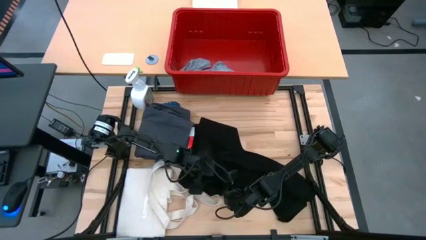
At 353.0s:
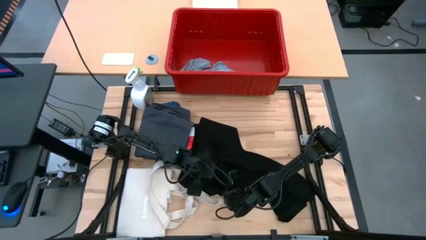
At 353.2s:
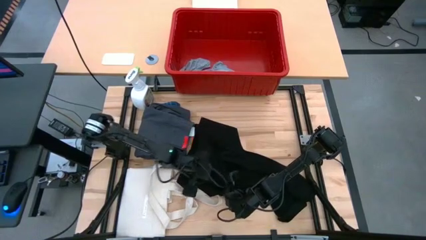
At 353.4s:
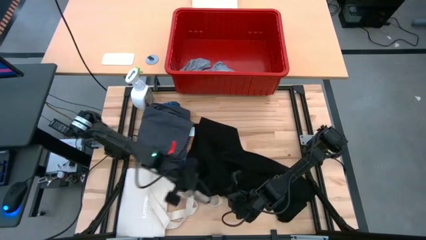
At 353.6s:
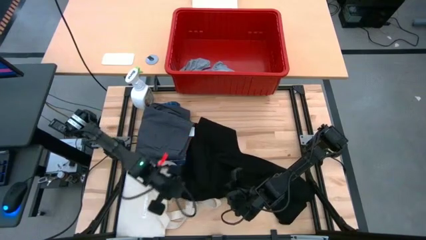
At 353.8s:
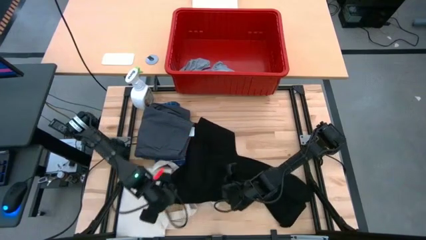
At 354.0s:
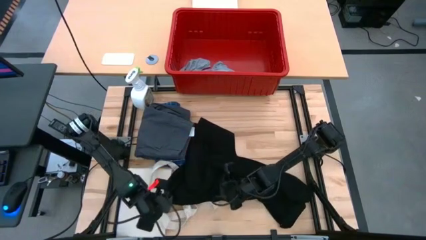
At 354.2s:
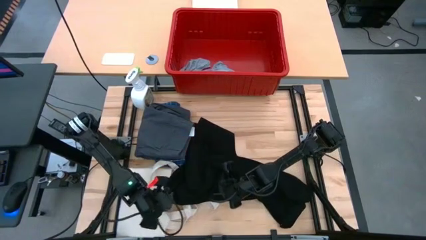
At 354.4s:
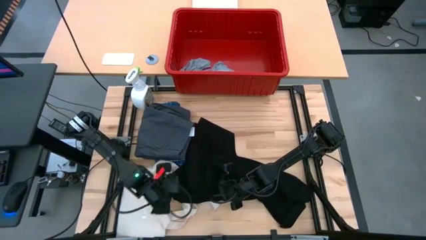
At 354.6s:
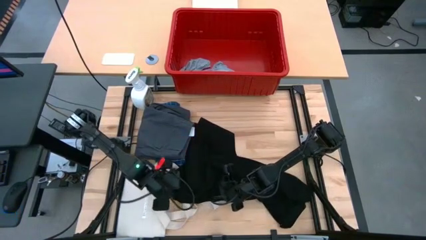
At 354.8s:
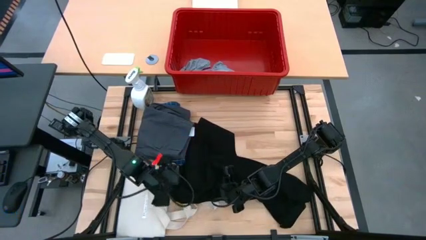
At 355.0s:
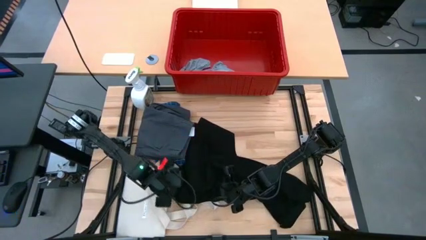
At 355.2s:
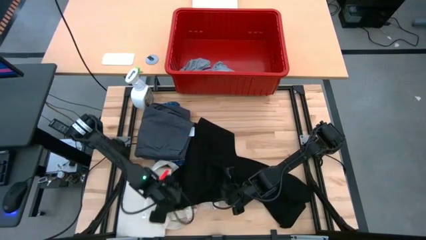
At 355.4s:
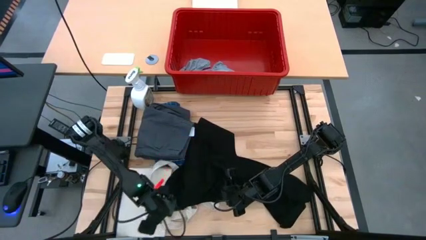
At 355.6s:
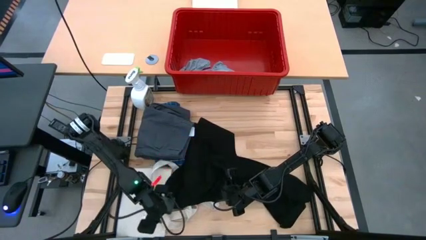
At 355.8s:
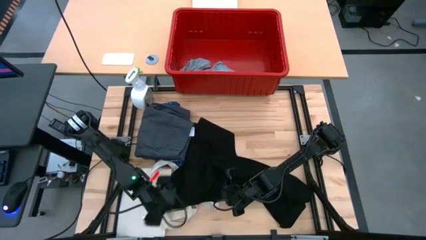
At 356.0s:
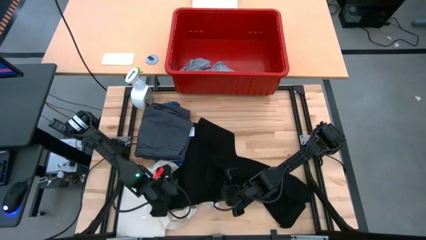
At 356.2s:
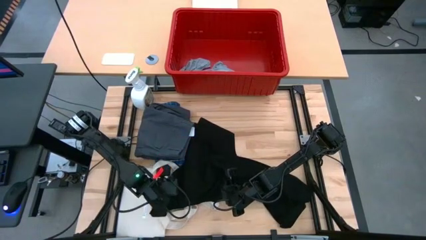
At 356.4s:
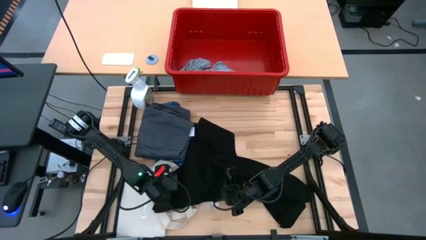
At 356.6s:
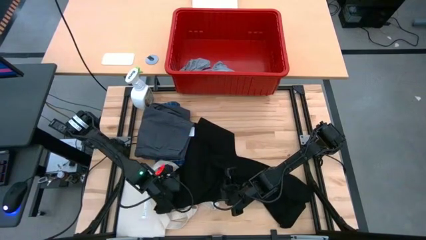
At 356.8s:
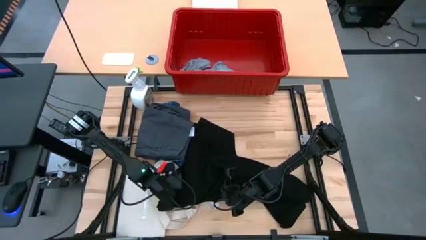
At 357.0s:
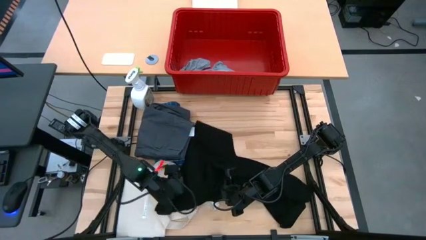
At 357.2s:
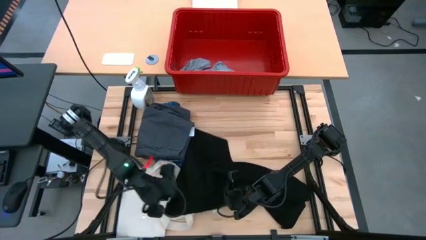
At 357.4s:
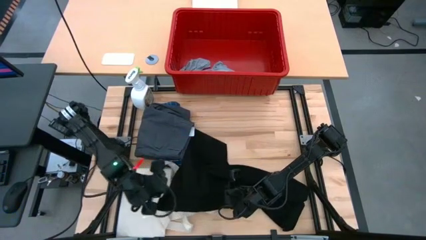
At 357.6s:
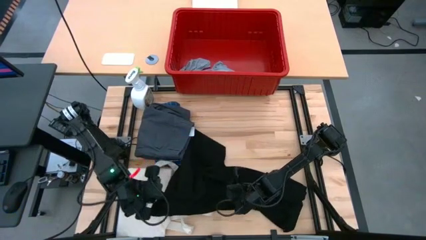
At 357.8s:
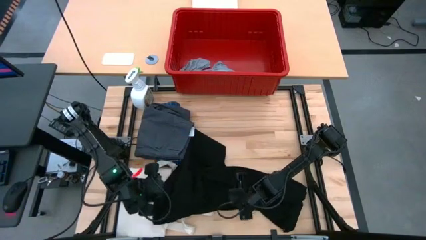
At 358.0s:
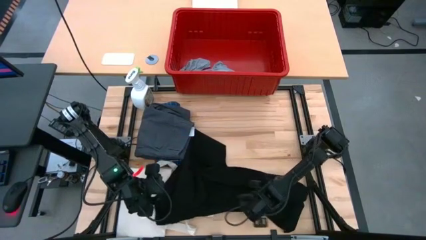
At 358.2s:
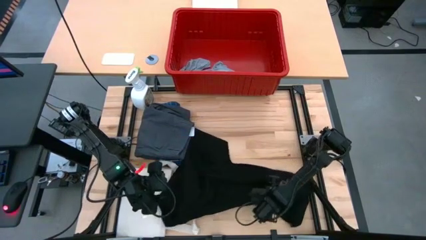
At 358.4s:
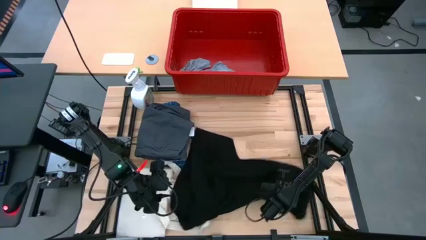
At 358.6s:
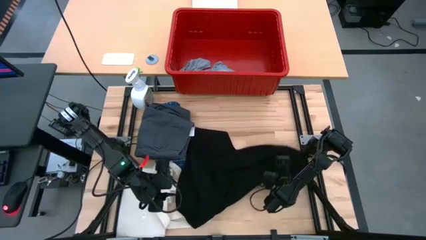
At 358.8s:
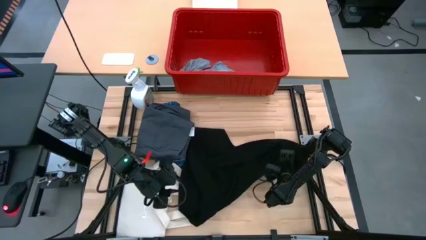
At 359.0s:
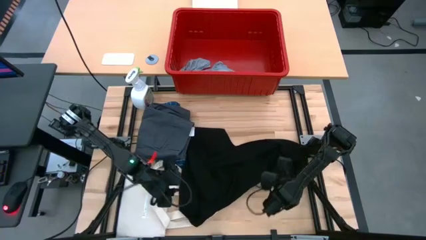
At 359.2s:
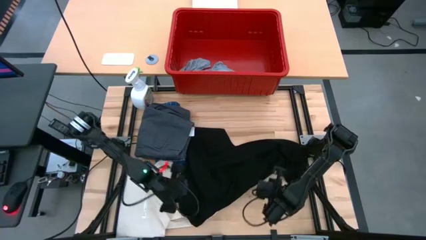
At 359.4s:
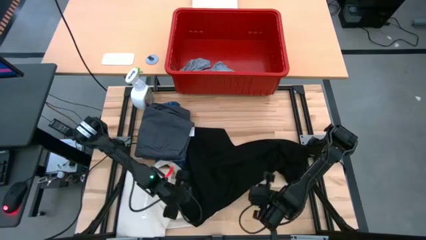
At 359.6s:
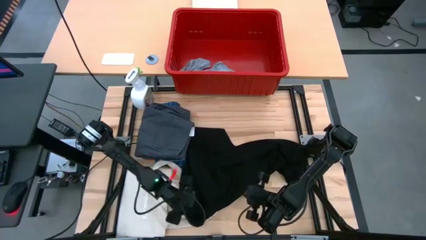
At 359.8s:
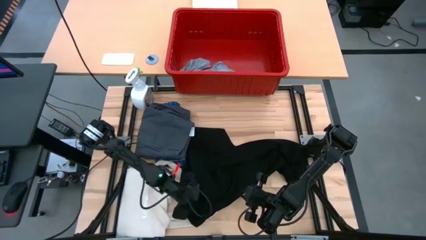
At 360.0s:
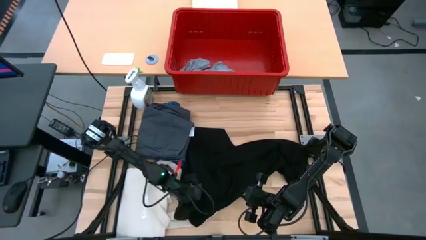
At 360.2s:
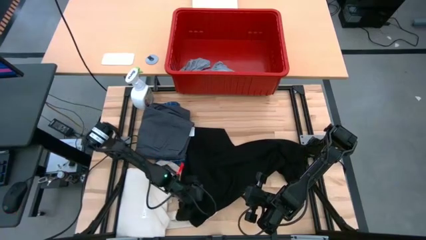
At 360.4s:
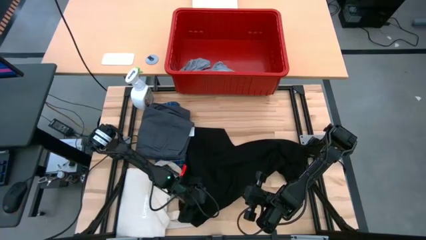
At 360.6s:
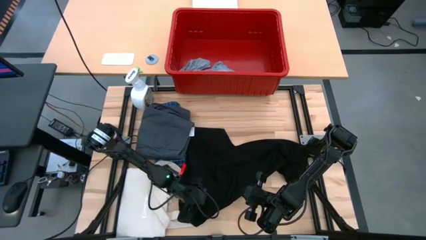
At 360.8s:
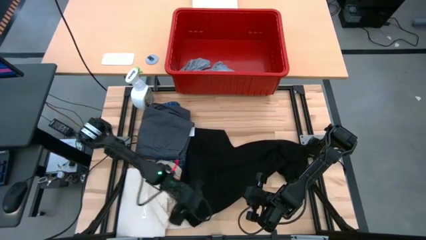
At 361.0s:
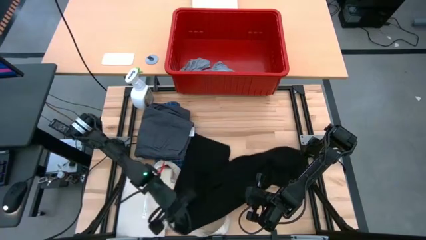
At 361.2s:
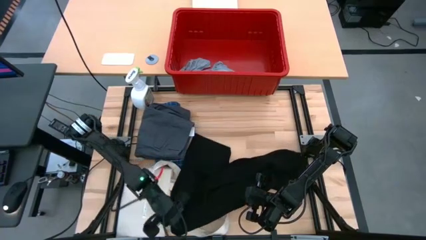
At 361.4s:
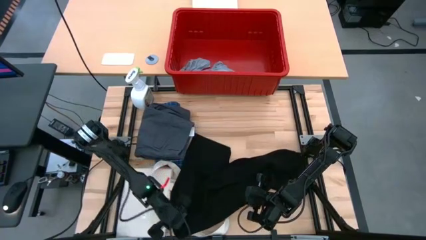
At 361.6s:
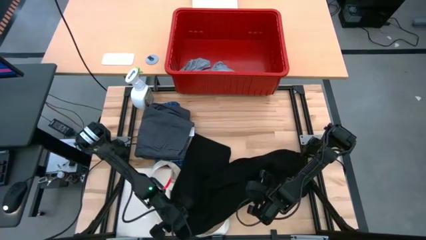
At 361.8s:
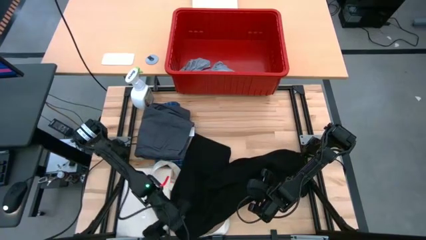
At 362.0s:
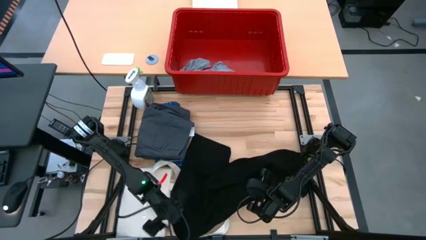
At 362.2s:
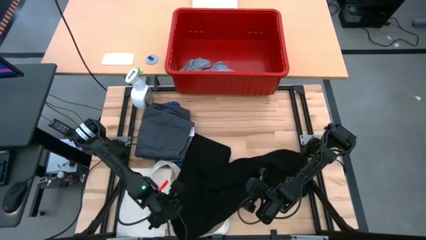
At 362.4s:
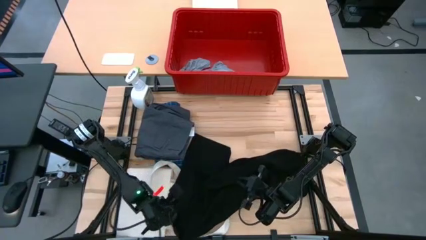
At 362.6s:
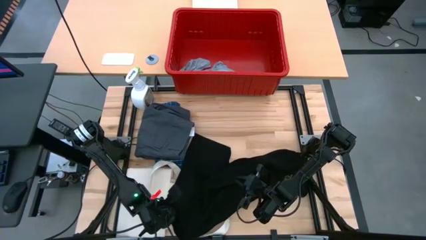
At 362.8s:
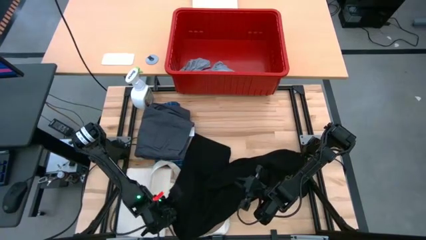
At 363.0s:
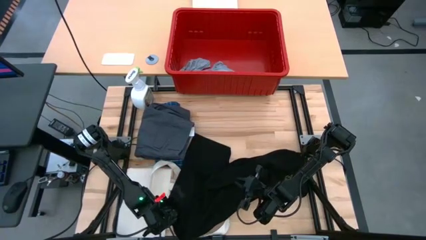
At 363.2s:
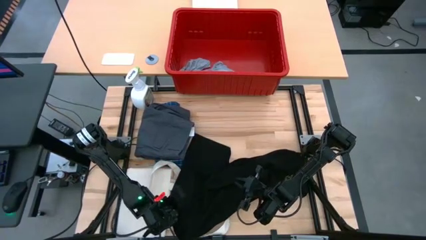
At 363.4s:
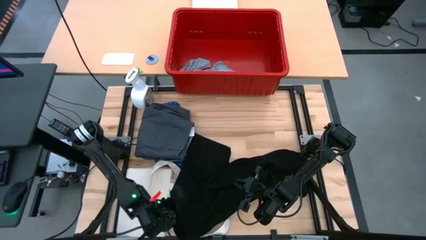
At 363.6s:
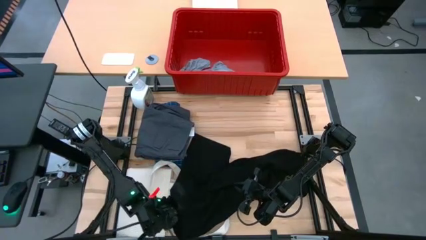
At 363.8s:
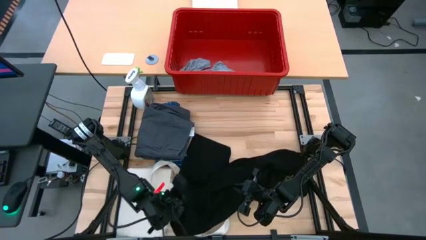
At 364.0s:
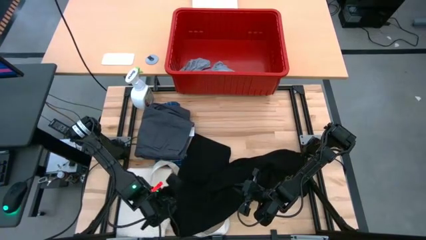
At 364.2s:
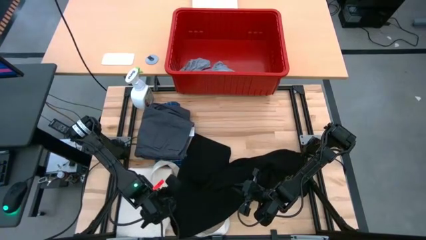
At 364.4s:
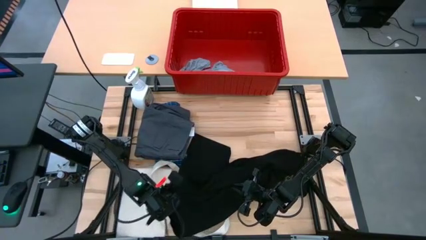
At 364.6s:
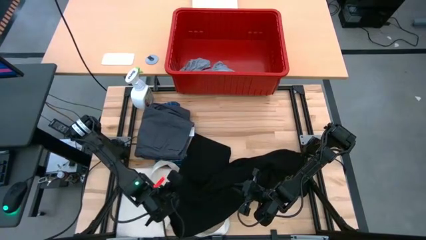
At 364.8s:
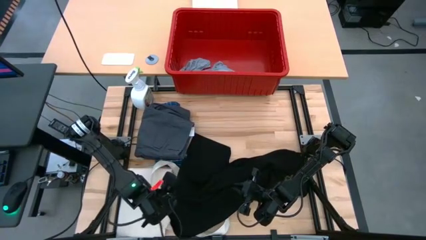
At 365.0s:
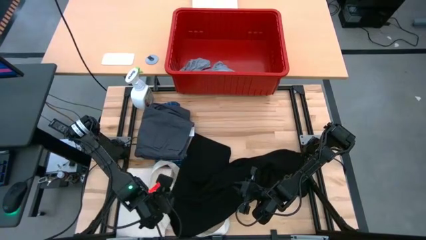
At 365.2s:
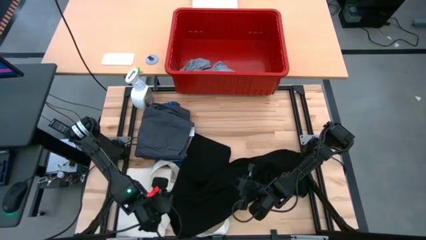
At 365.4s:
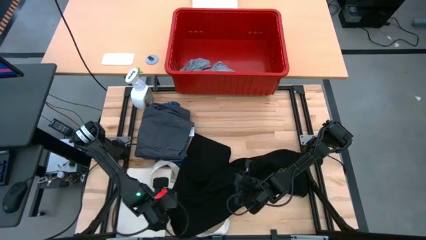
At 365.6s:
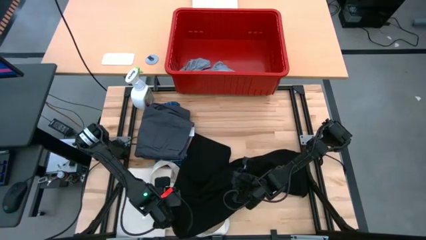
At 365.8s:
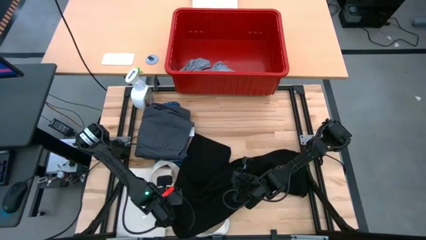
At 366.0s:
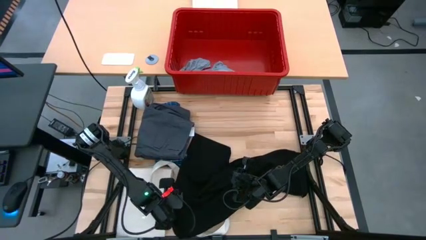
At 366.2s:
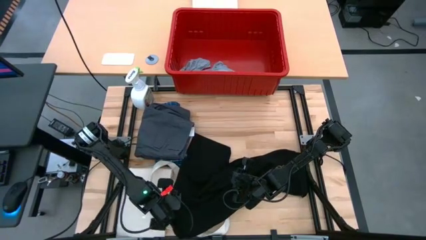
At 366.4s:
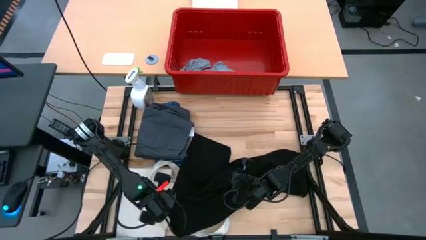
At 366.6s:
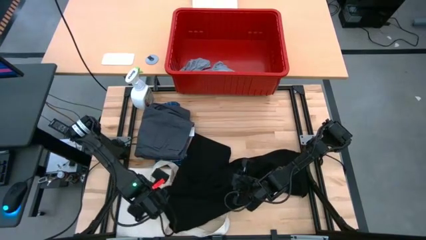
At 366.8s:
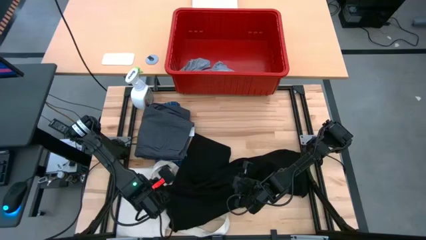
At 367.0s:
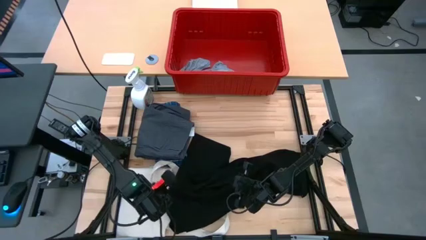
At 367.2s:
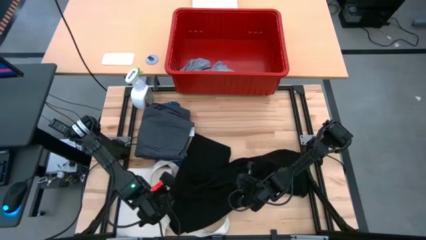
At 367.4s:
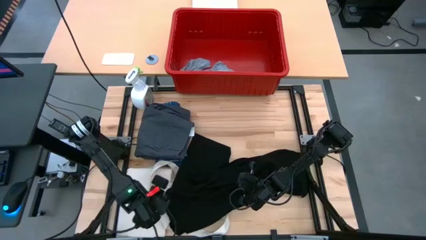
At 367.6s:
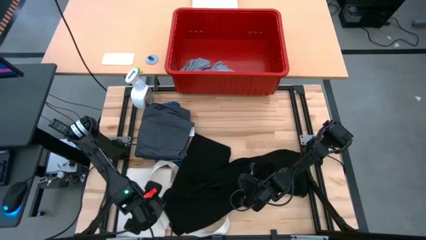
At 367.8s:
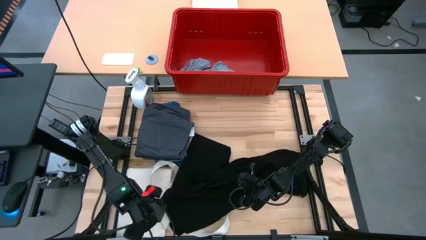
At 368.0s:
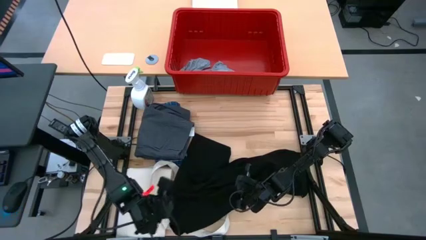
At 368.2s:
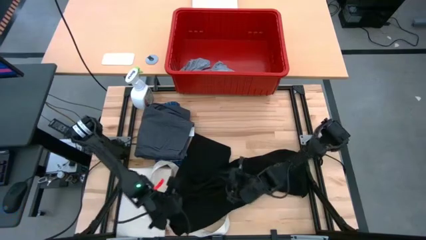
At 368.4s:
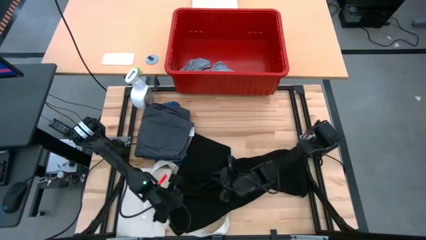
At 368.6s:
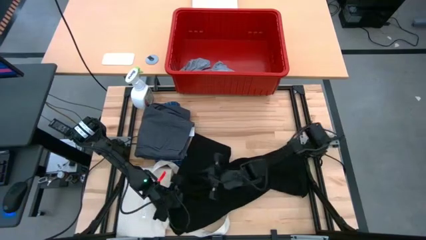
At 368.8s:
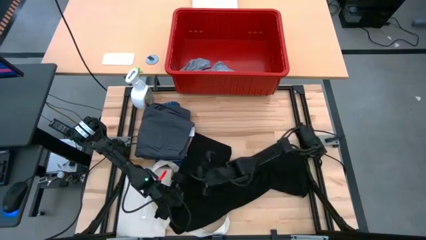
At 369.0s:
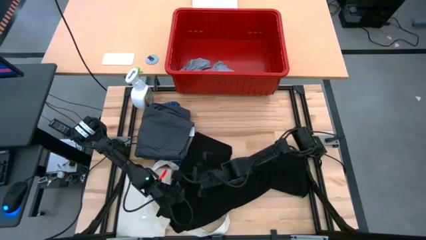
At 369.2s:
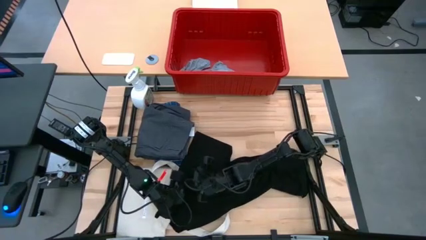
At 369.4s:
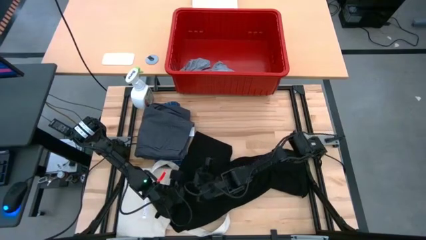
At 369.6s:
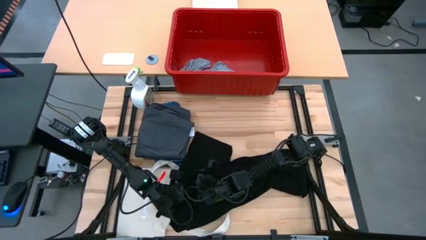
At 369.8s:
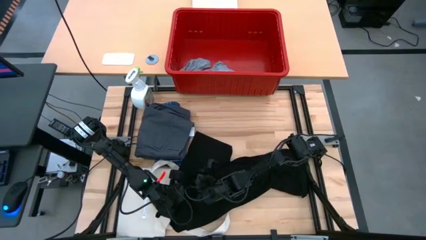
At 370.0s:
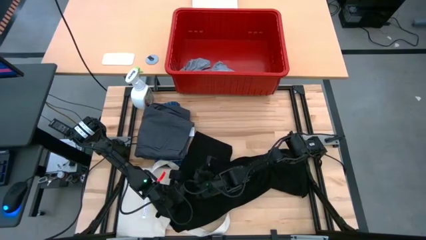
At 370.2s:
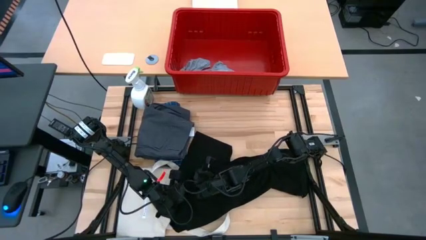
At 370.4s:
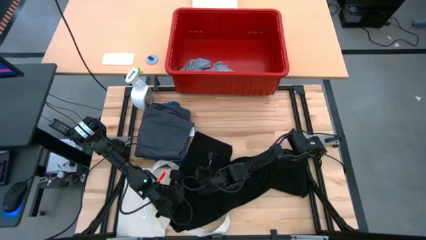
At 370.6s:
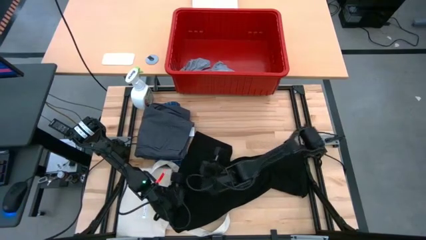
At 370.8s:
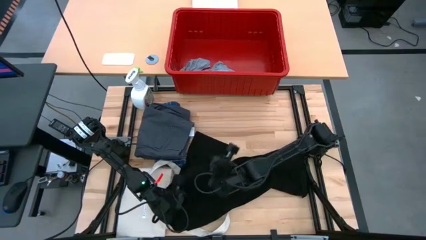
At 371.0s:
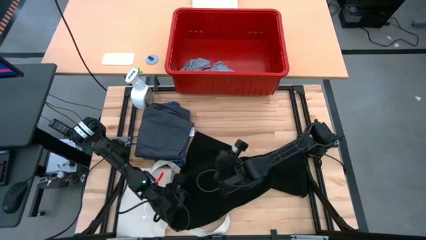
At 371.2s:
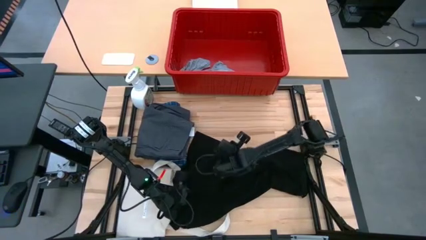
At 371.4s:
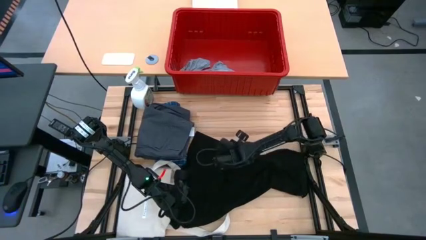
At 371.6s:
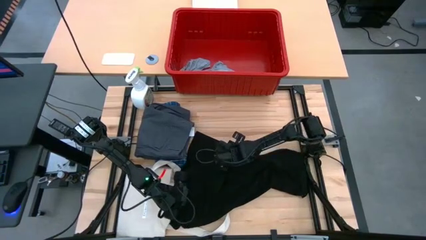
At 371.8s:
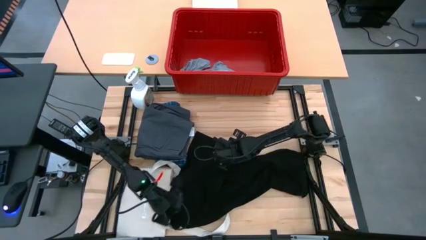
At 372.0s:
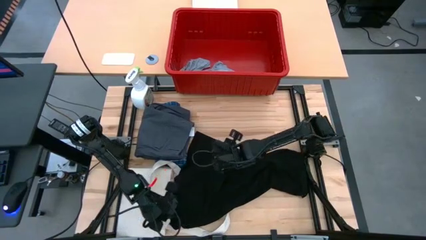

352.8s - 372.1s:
Task: Fold Laundry from Bin
Fold the black shirt
